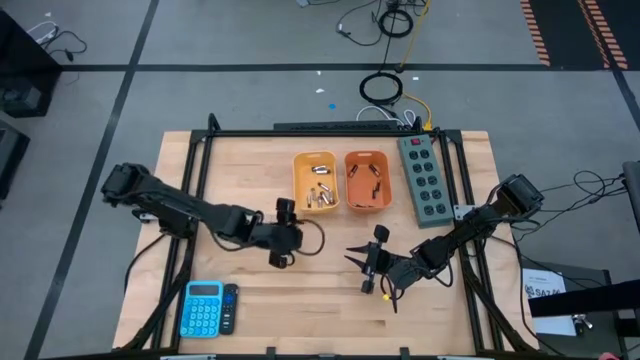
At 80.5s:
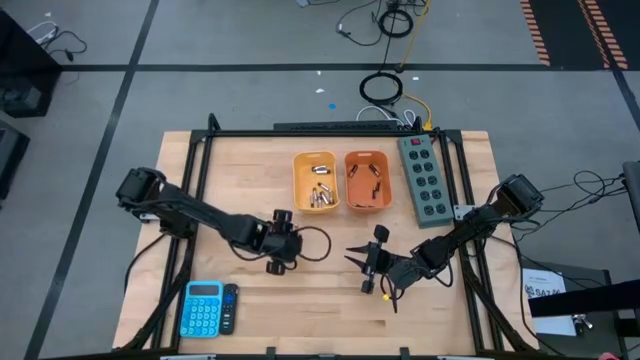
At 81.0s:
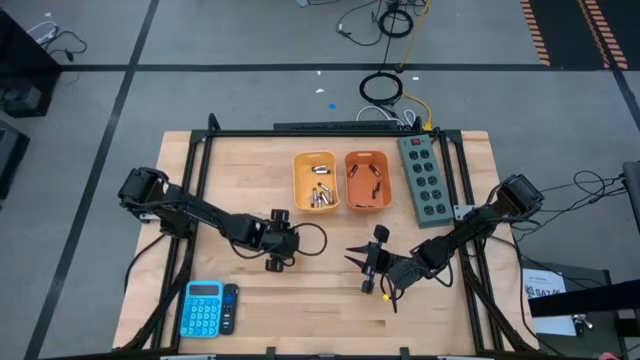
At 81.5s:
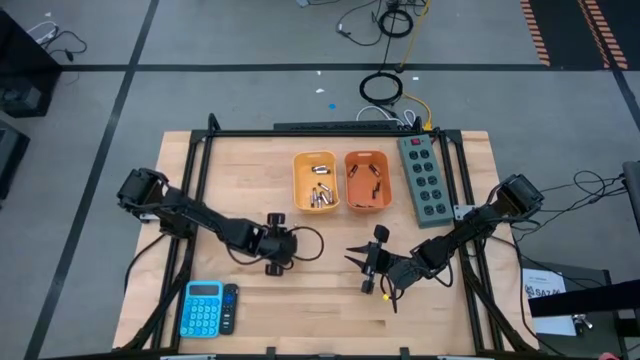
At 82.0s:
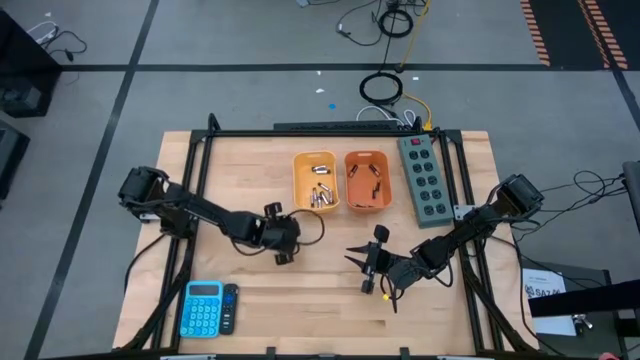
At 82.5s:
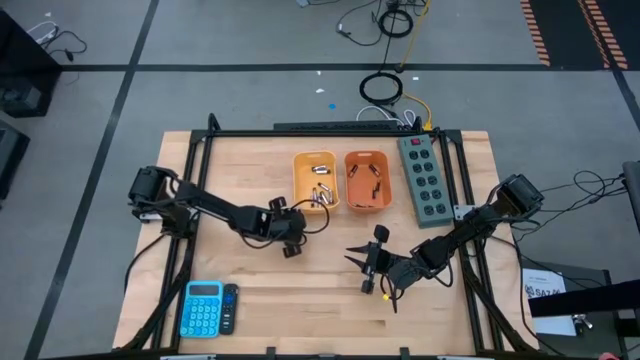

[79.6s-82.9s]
Task: Sort batteries
Put the silver battery into the yellow bin

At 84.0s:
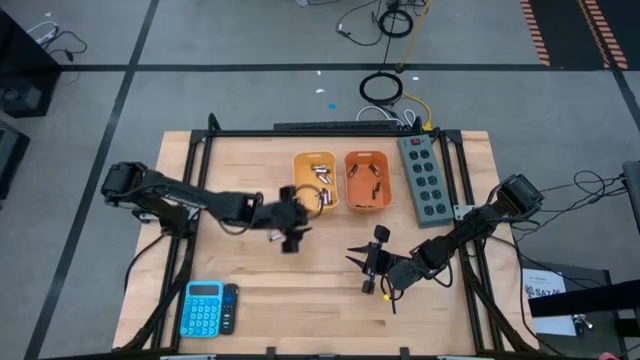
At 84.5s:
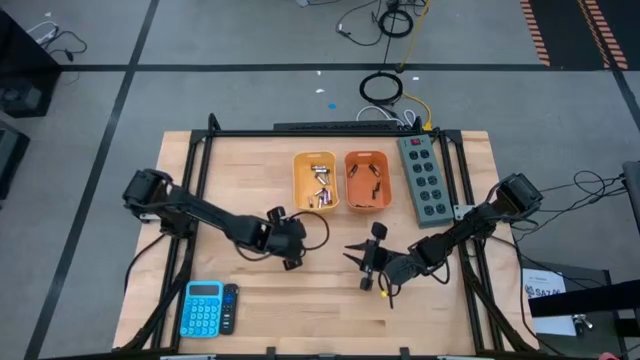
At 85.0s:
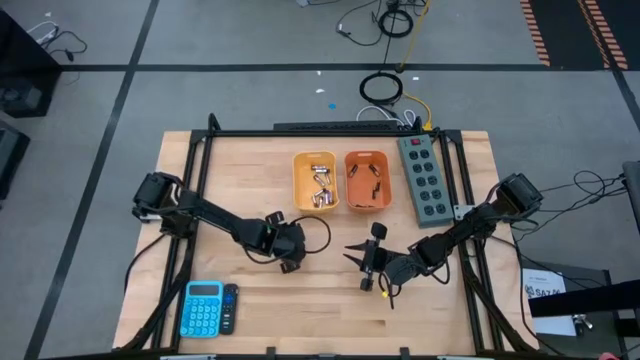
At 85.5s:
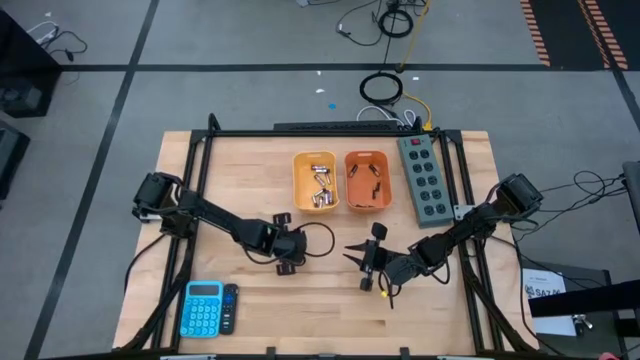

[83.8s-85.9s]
Put the silver battery into the yellow bin

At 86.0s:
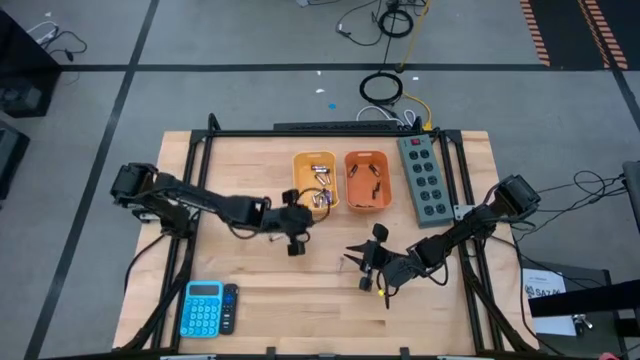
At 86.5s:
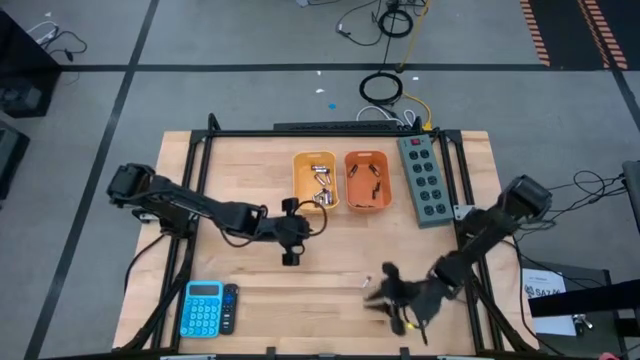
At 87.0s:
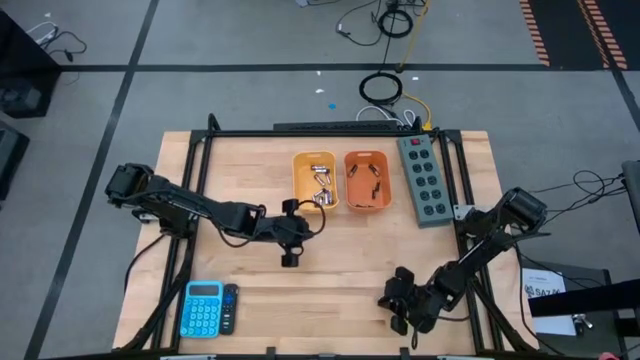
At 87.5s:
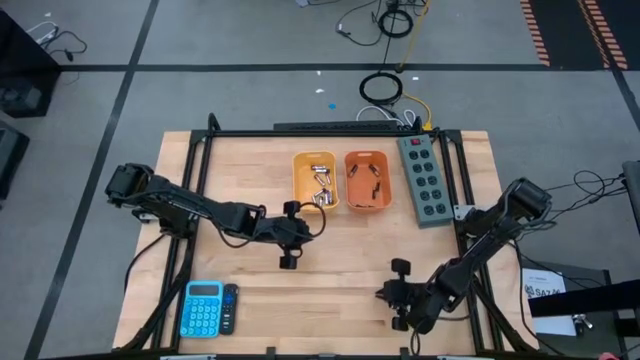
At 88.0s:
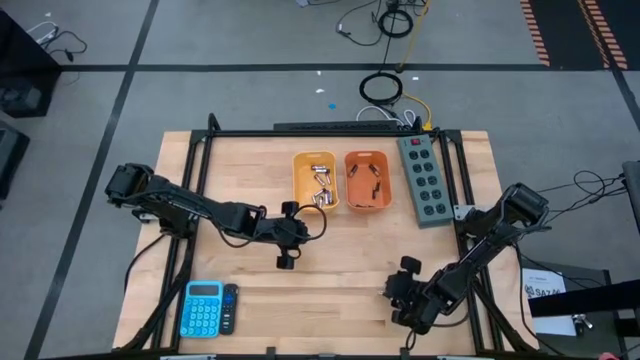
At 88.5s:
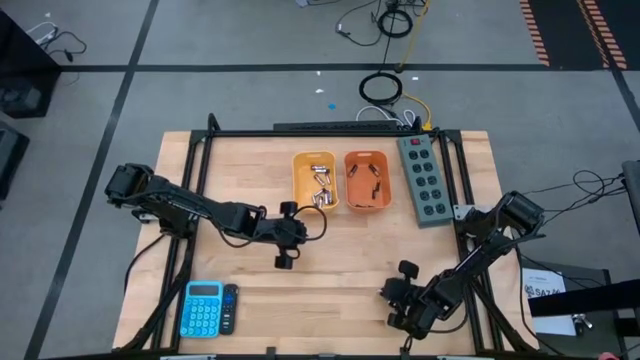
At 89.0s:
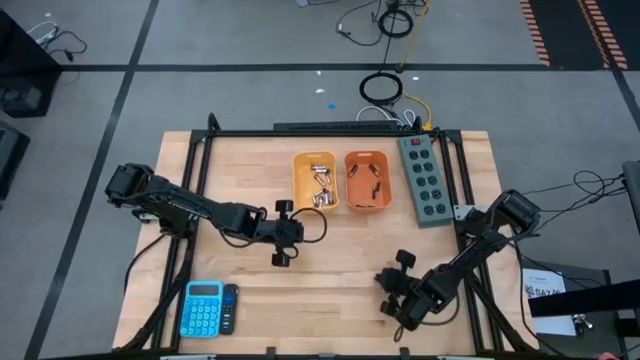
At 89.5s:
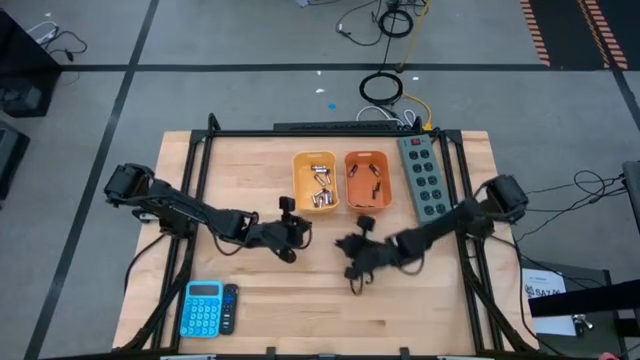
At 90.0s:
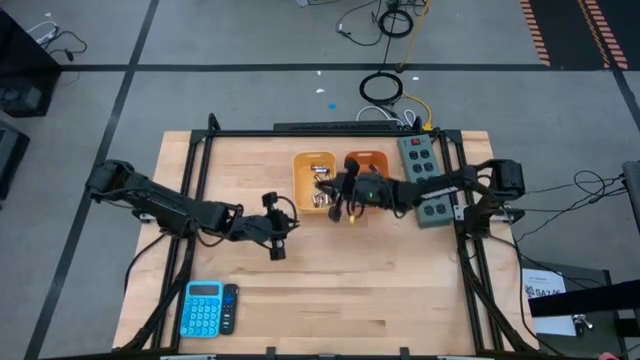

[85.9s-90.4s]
Put the silver battery into the yellow bin

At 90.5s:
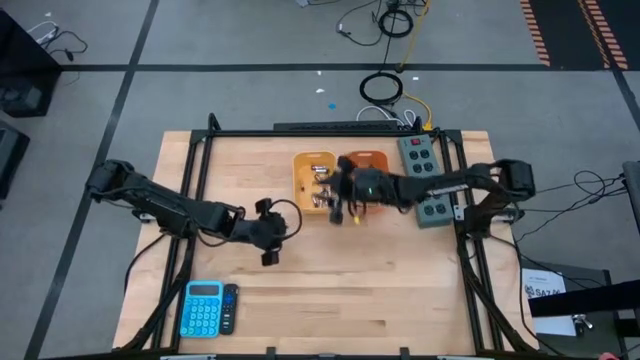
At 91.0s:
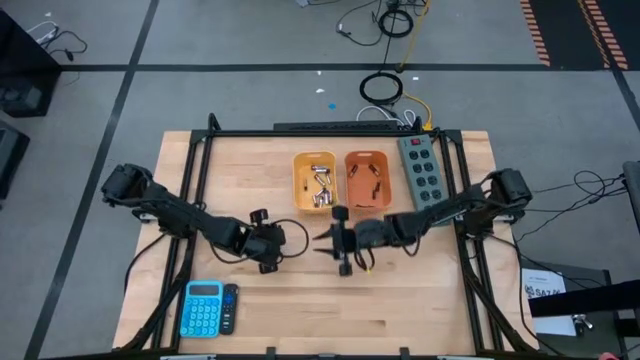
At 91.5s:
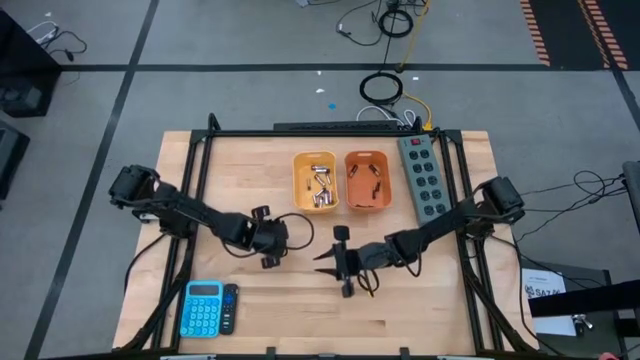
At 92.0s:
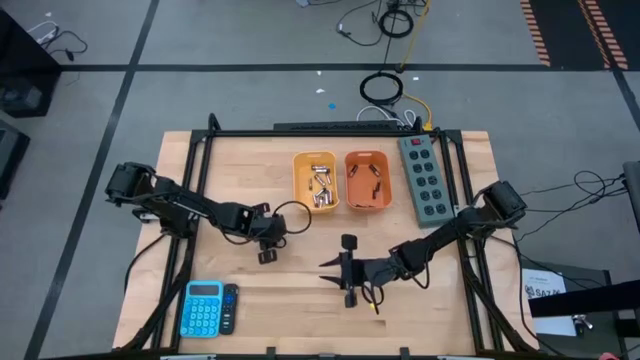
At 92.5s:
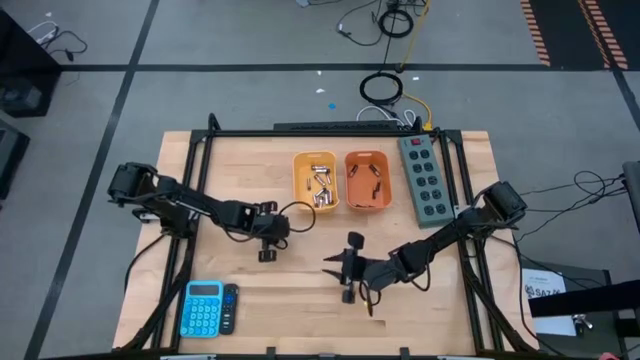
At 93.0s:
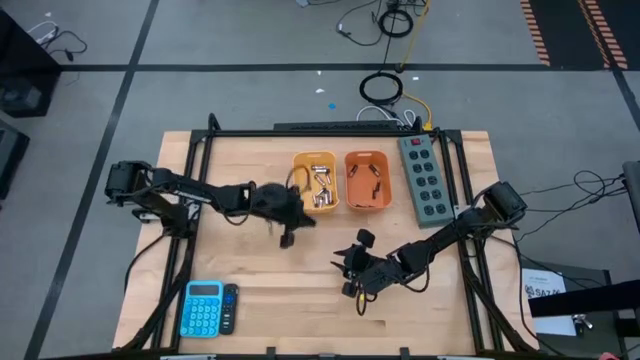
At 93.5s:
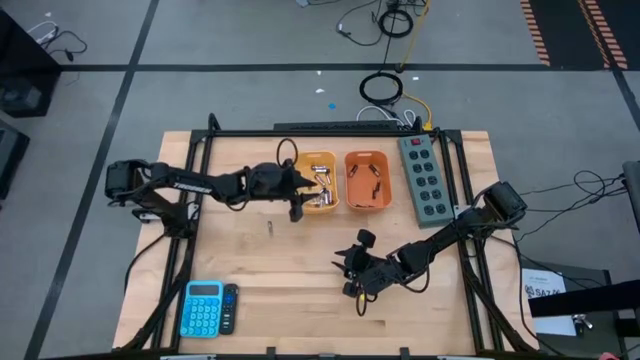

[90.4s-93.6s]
Put the silver battery into the yellow bin

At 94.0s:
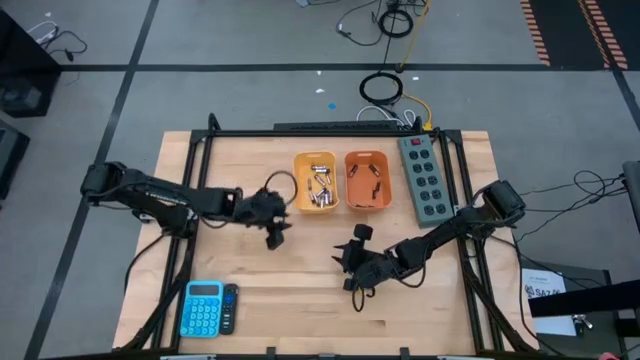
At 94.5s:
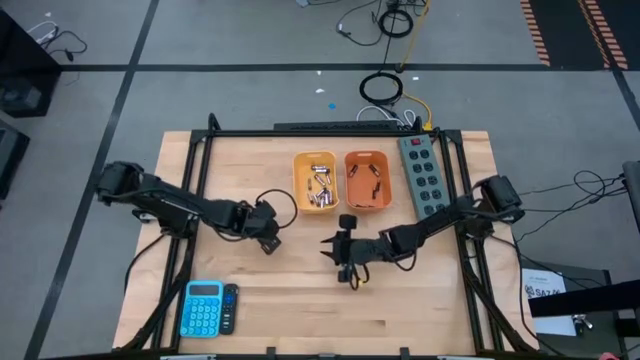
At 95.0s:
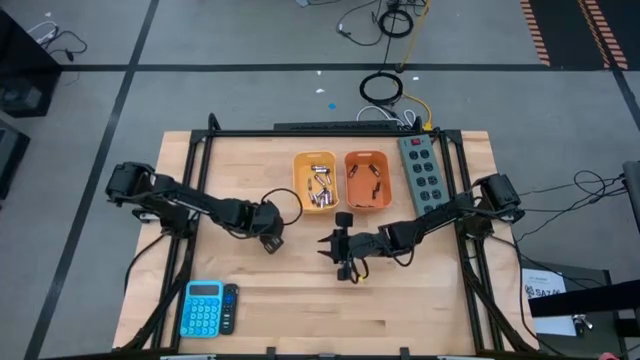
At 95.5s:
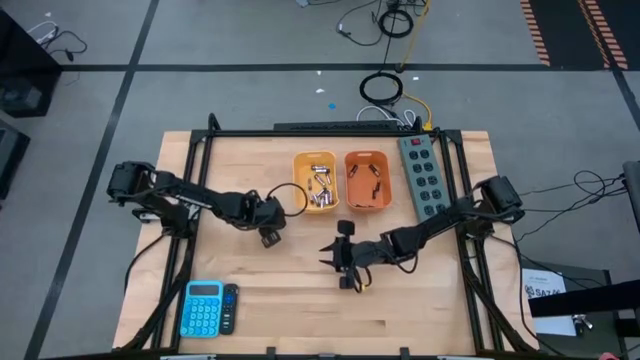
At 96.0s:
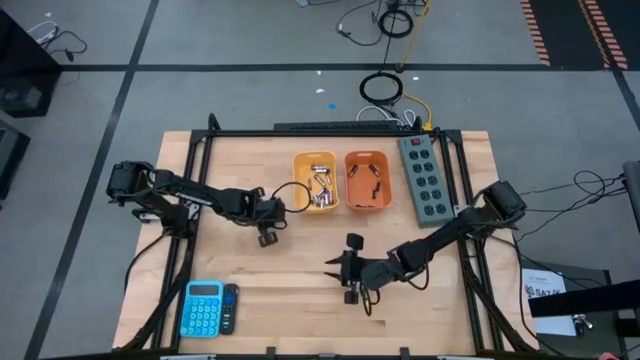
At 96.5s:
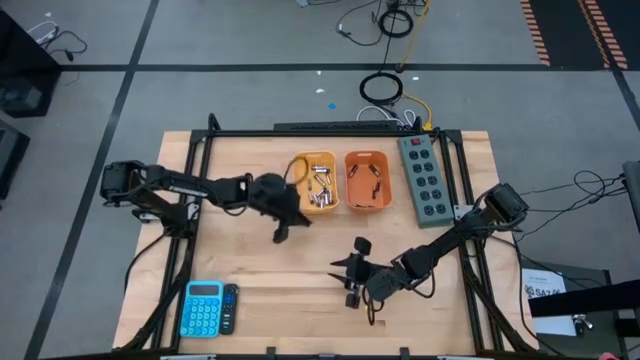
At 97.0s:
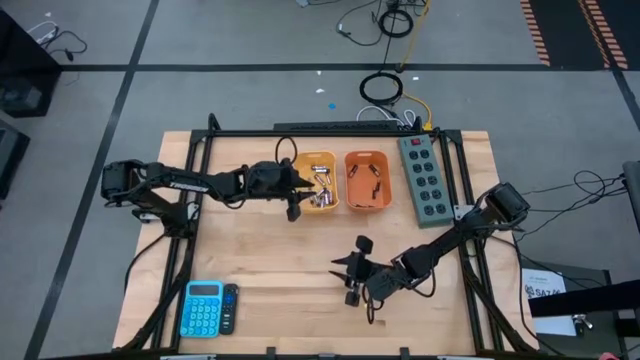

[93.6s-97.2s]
Put the silver battery into the yellow bin

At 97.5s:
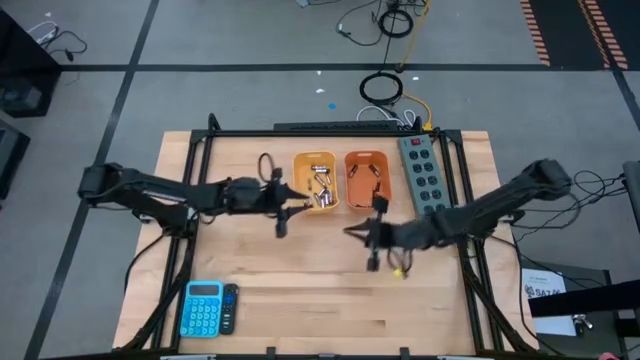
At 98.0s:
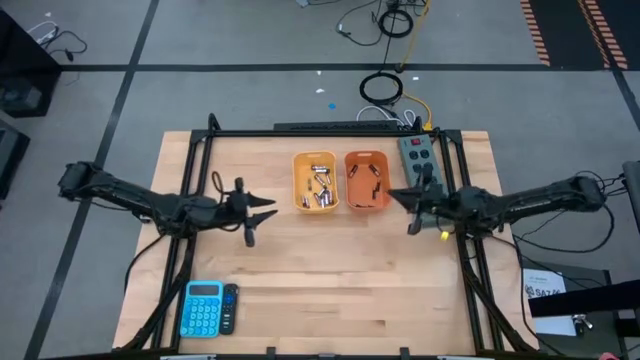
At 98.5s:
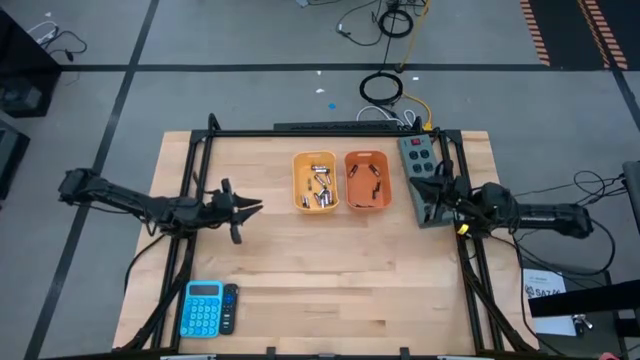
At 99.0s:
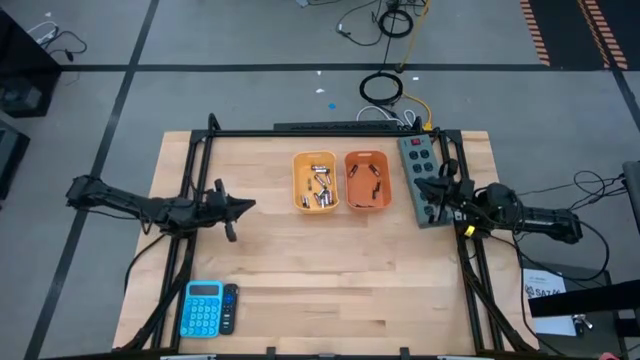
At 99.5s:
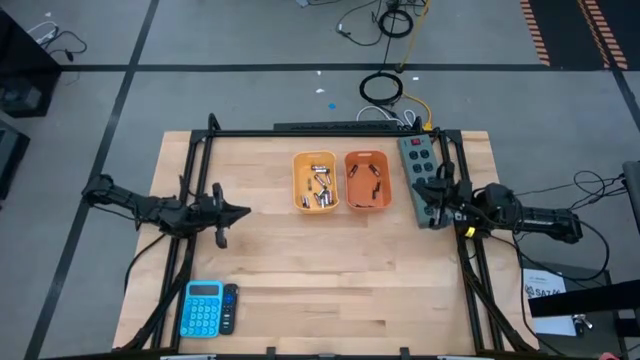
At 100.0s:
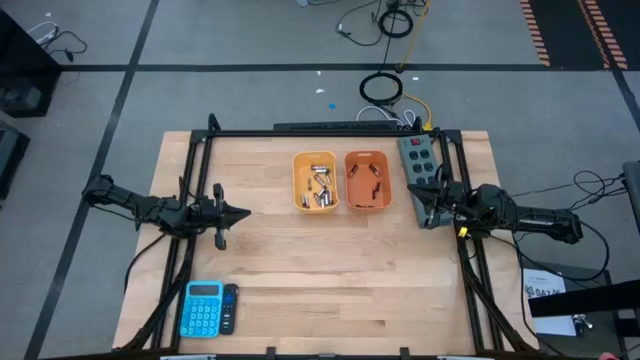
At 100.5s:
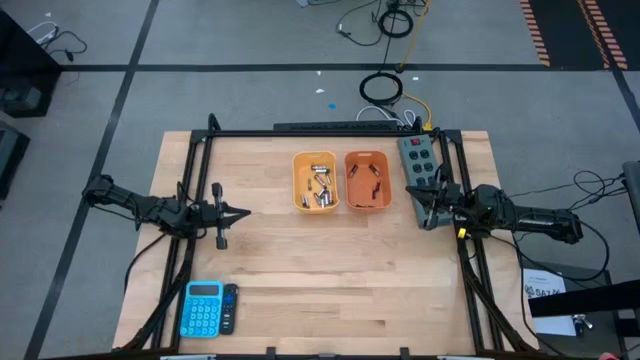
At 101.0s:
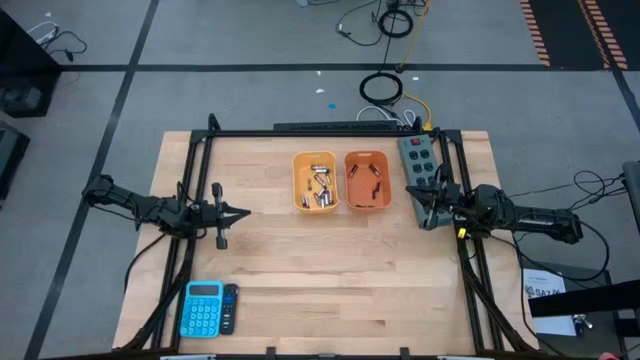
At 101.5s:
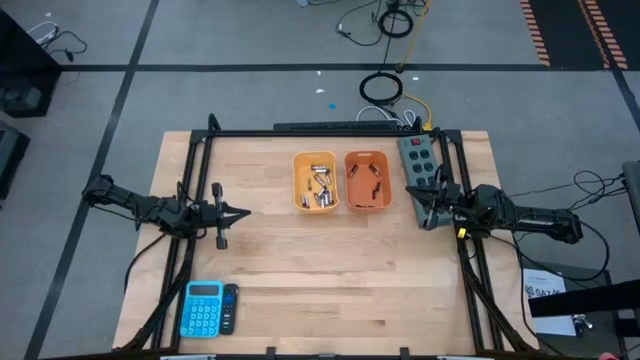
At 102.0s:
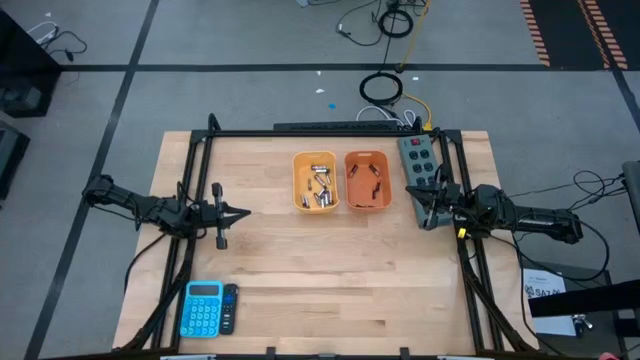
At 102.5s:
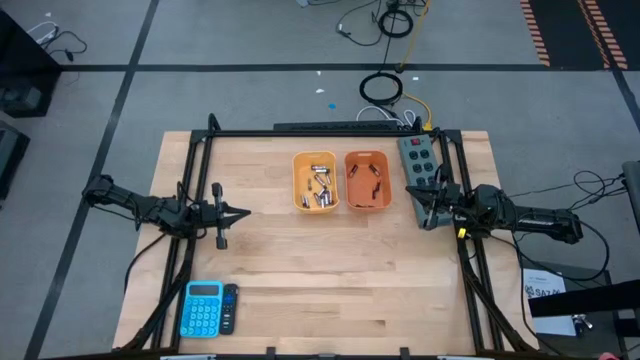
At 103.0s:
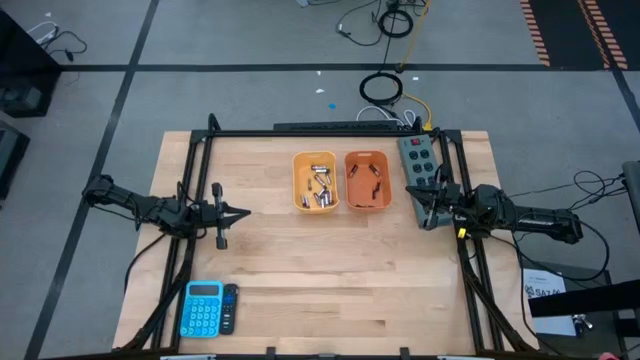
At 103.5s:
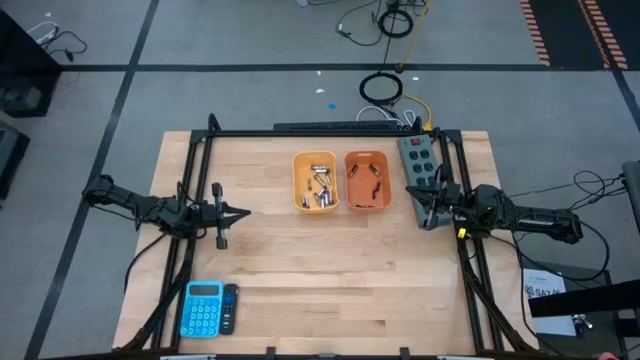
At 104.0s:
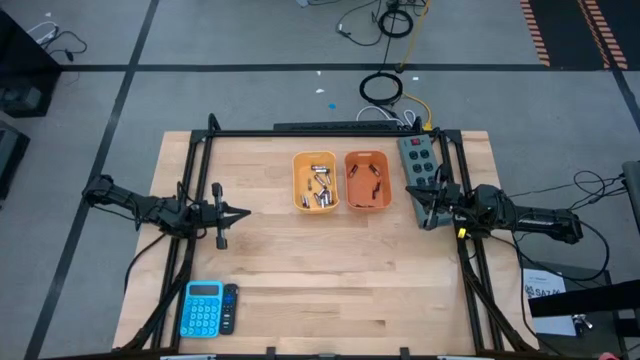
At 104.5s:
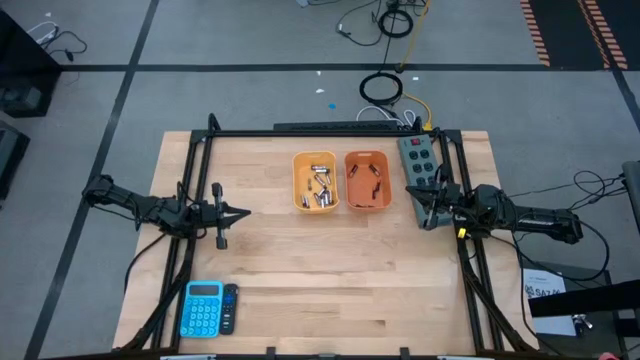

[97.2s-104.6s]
Return to Home Position
